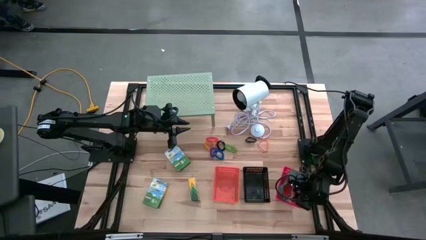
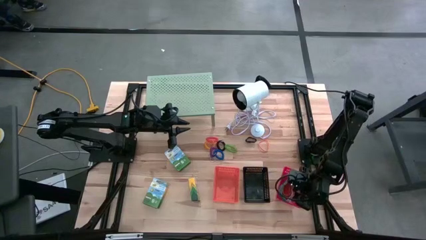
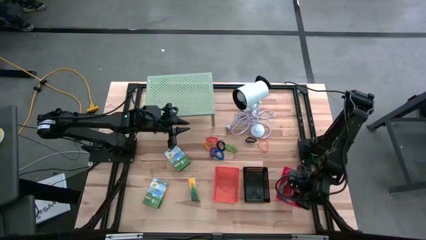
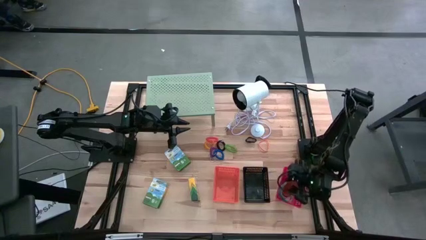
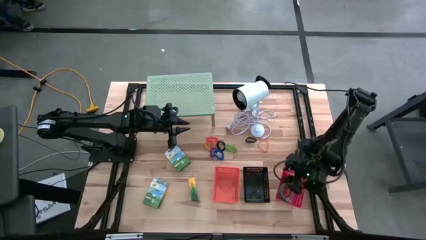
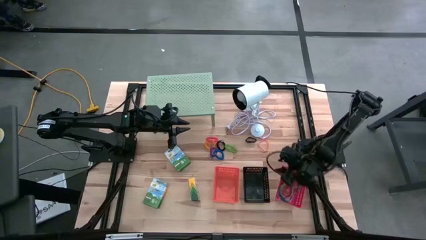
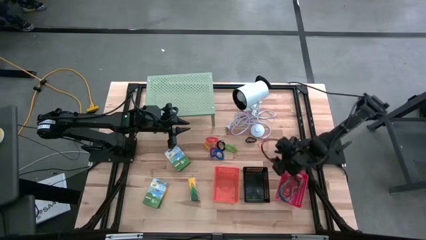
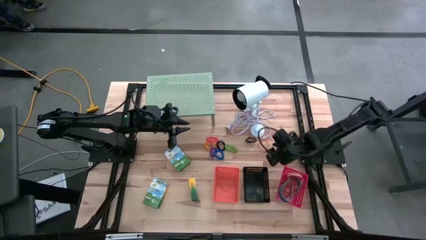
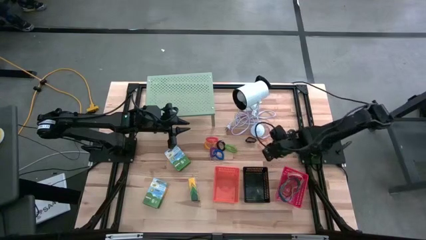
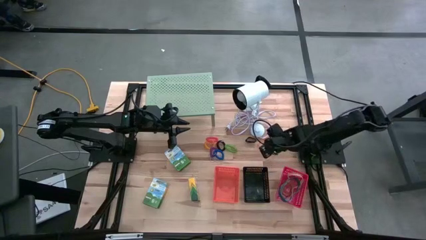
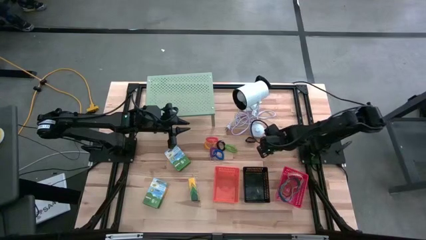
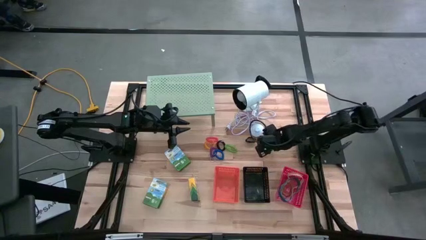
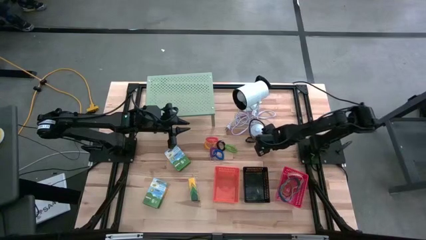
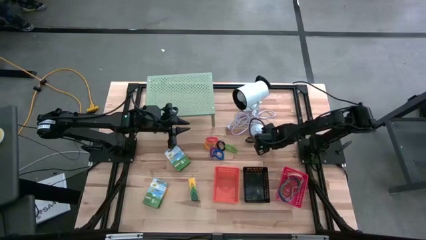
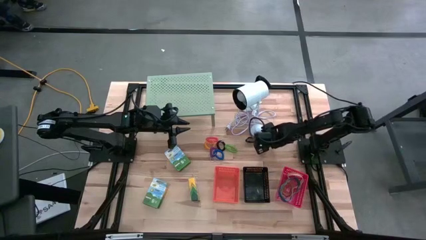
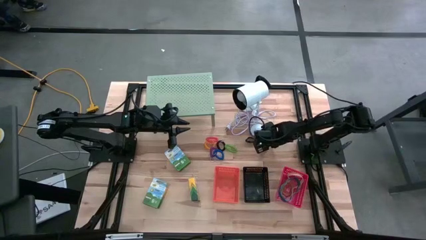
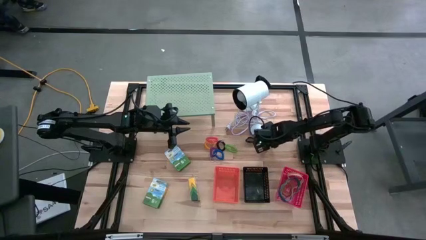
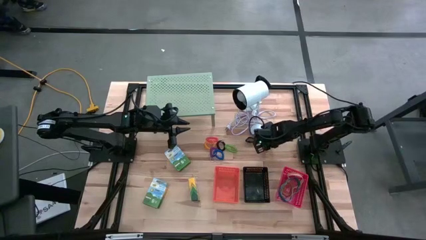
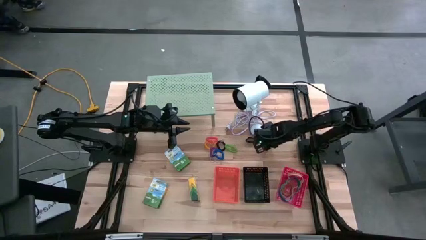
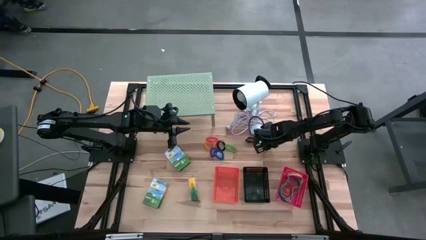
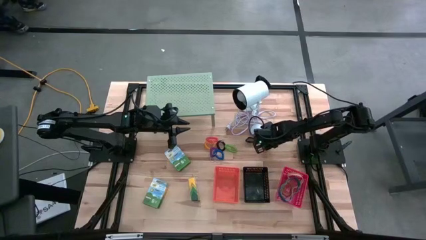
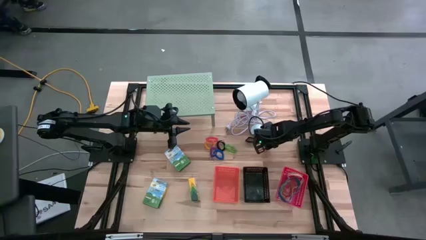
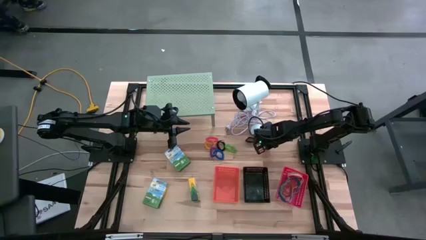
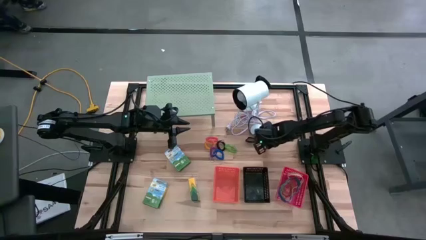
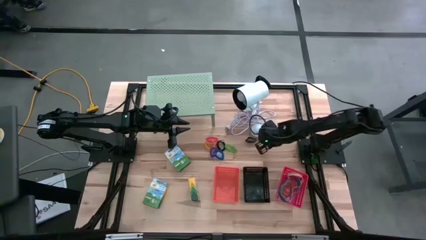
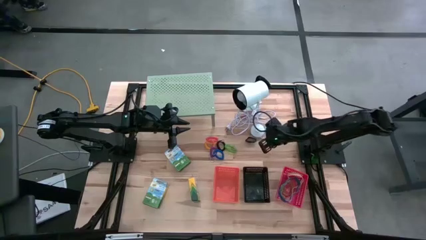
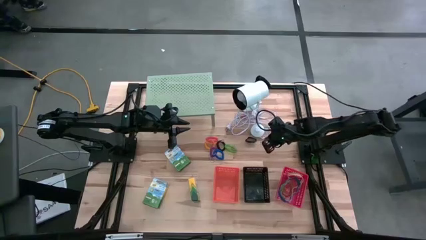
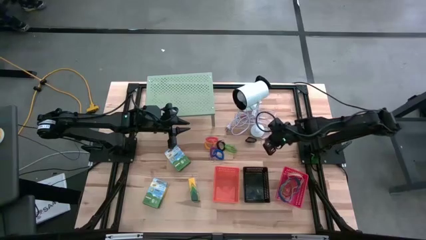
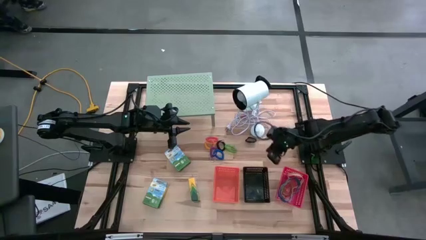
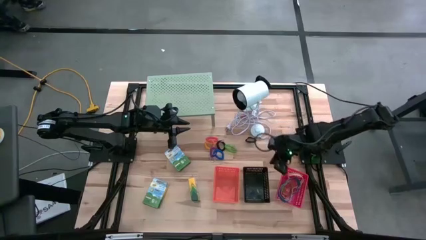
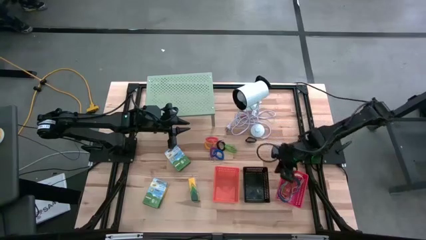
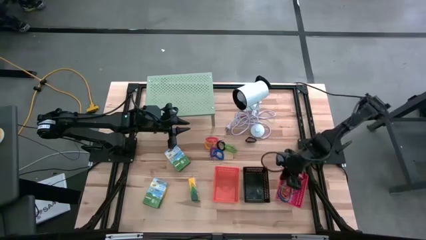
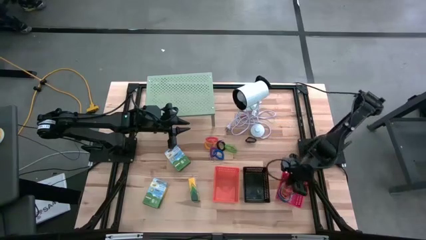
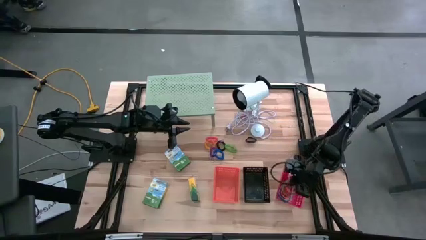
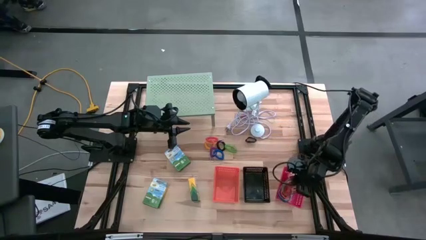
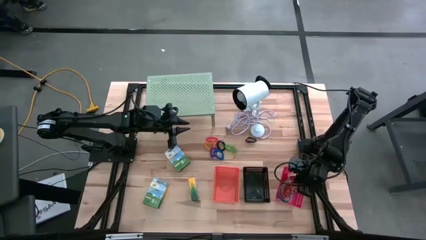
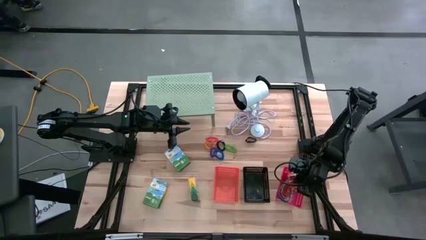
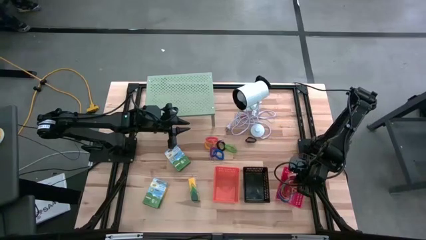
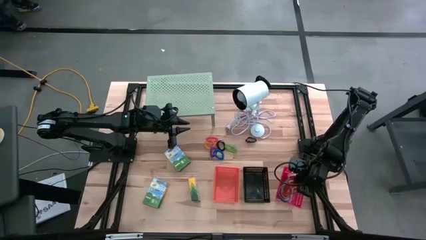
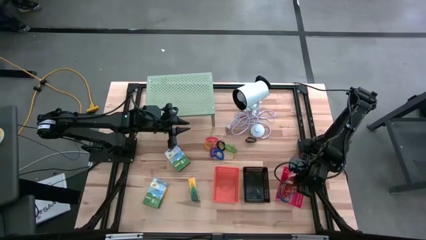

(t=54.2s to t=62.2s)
Task: Pick & Place Office Desk Supplies
Put the orange rubber band into the red basket

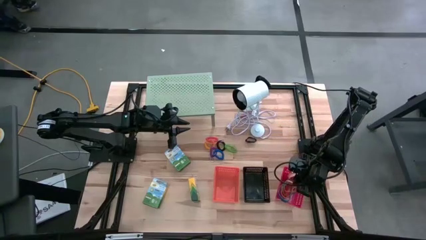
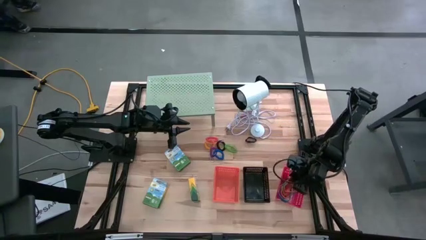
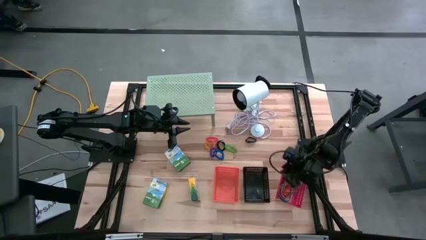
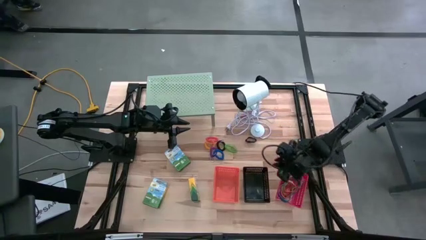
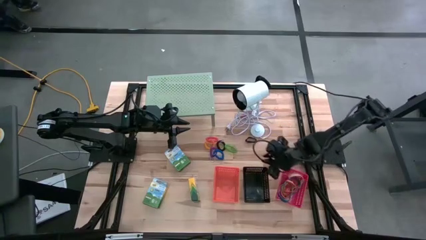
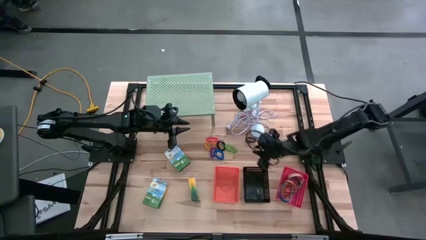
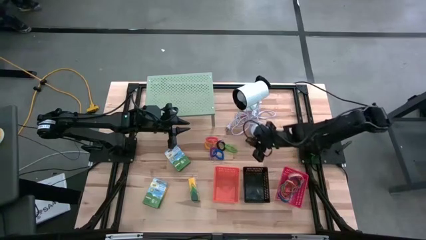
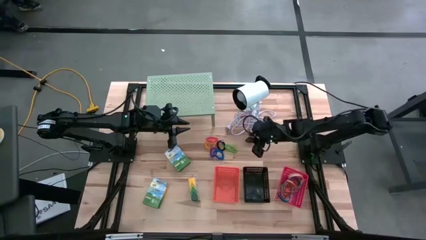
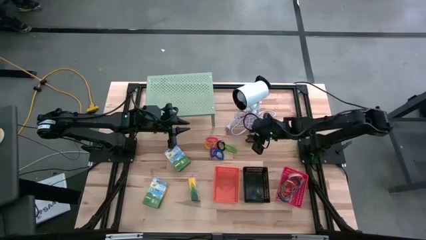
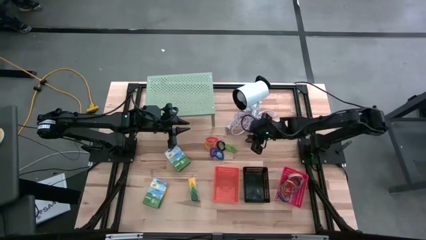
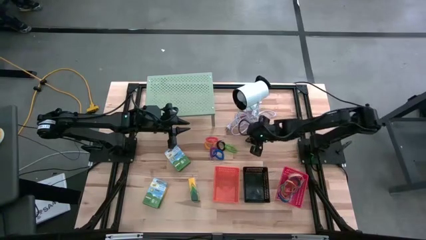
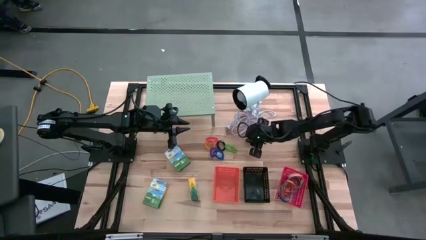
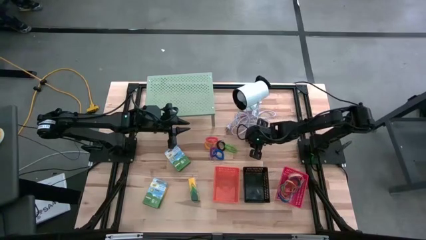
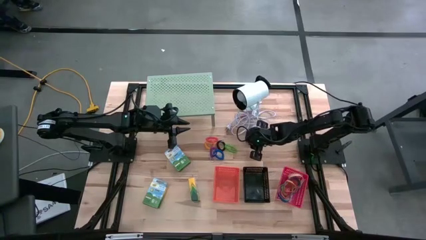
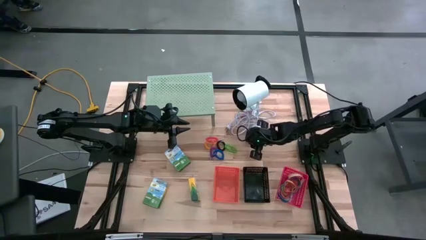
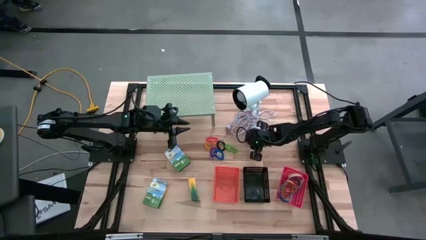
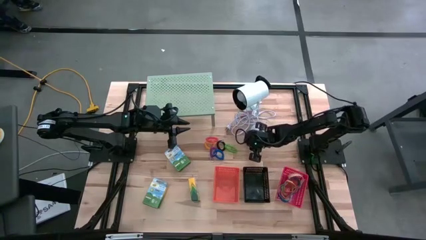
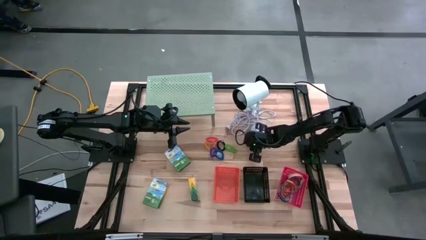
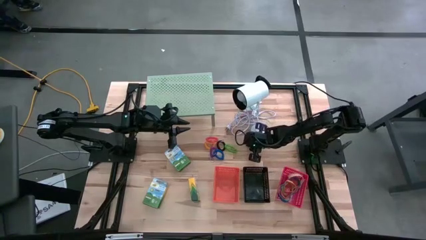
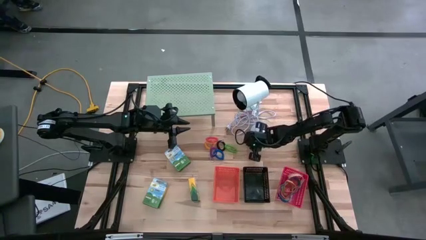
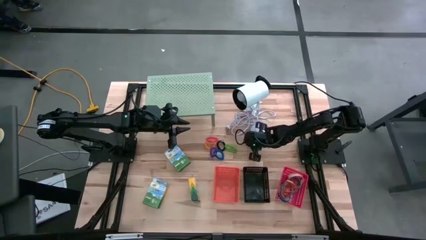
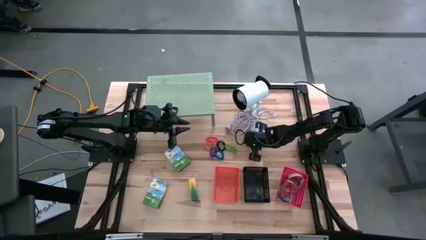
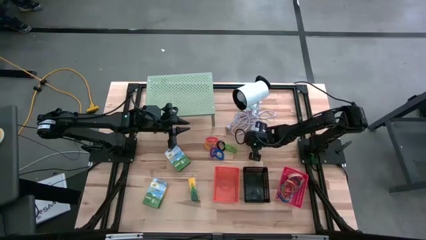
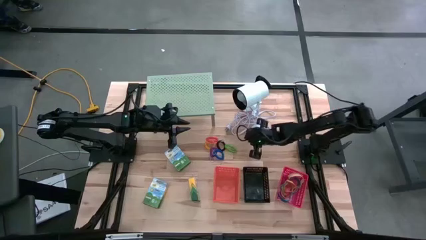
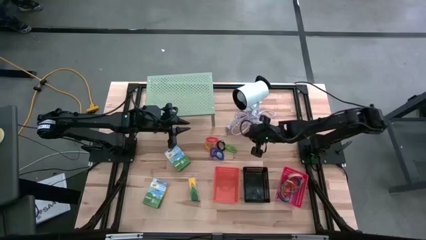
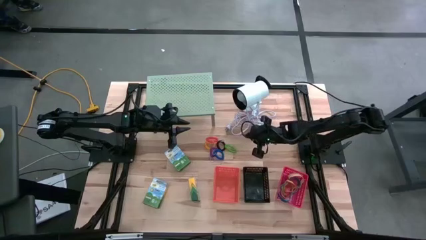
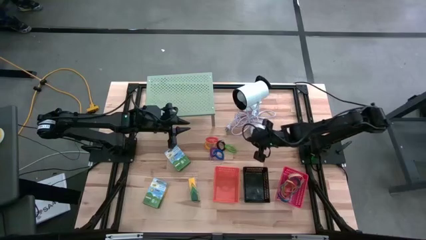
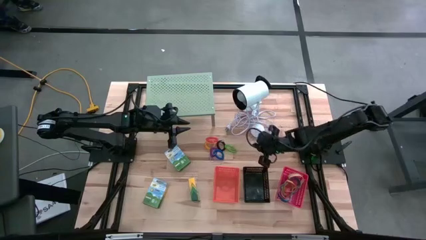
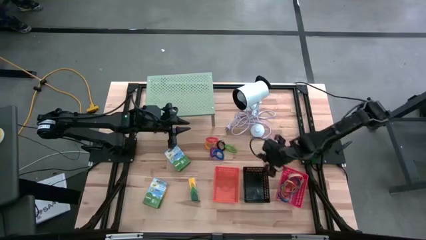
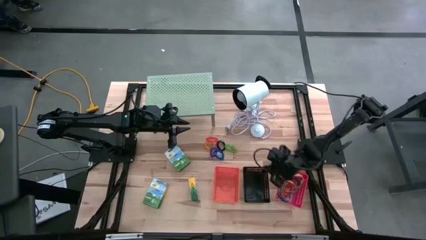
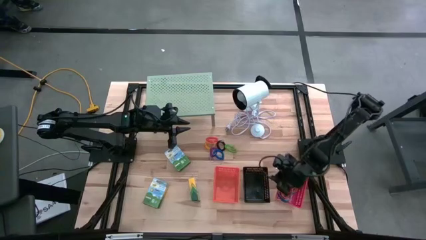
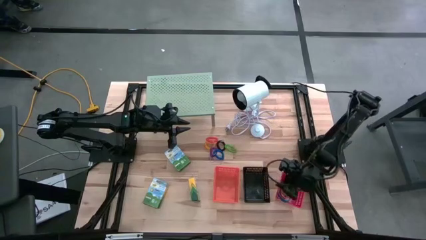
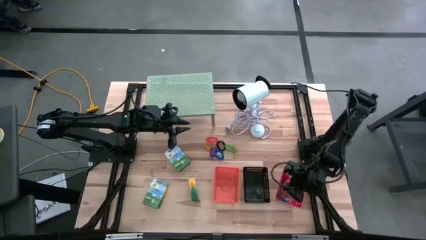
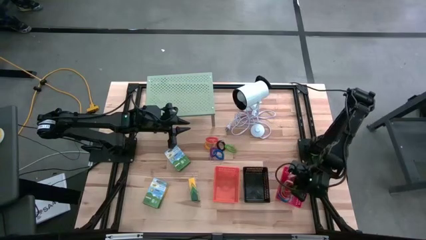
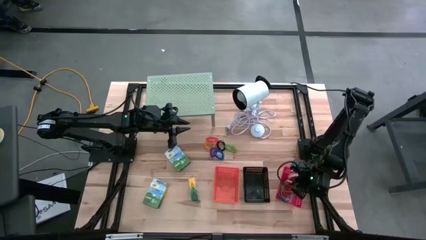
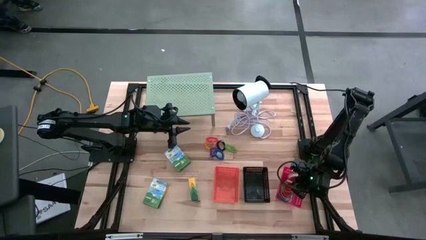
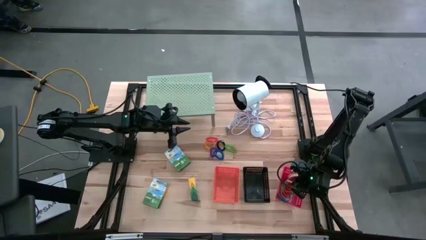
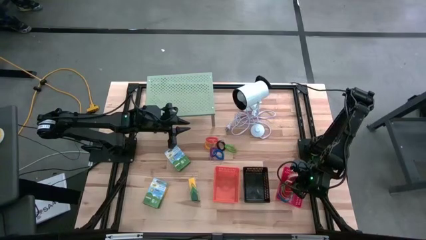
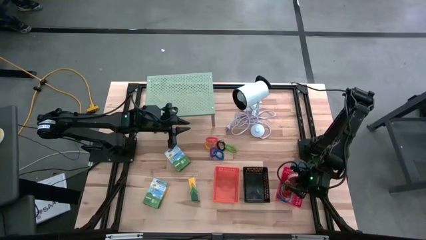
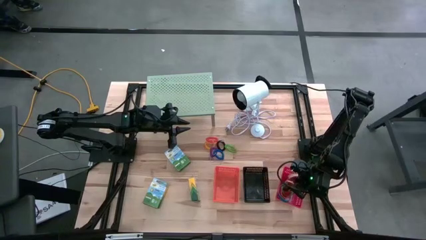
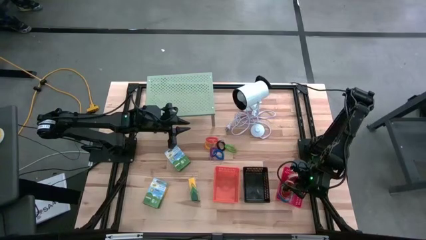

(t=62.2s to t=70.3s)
Put the black rubber band into the red basket
